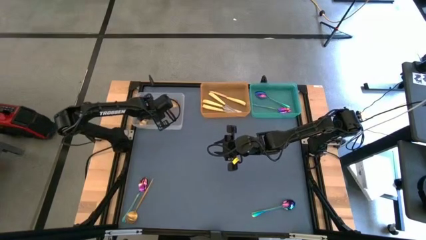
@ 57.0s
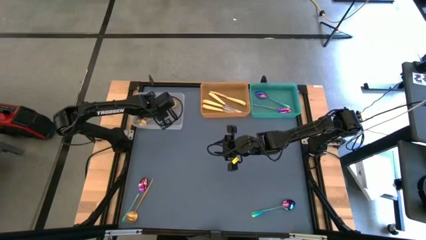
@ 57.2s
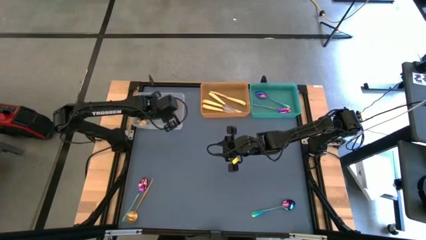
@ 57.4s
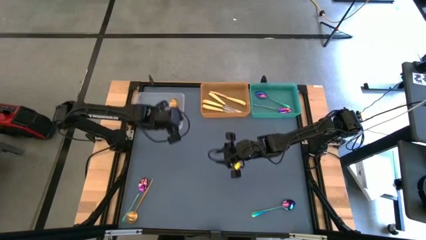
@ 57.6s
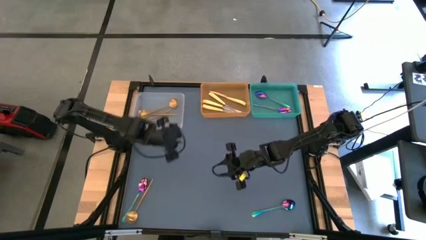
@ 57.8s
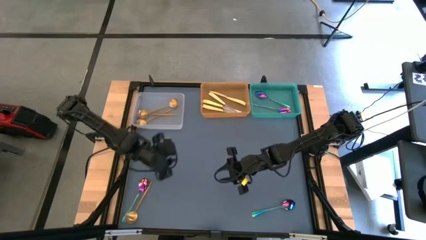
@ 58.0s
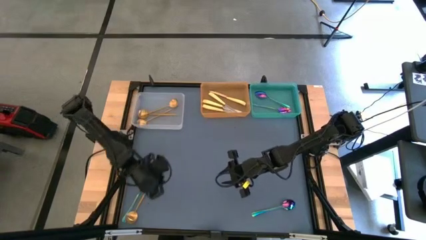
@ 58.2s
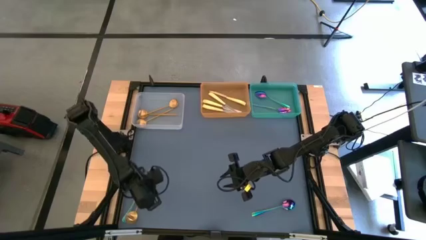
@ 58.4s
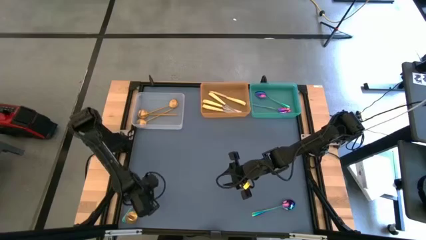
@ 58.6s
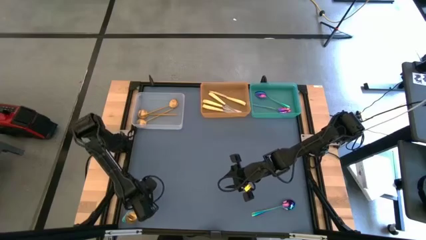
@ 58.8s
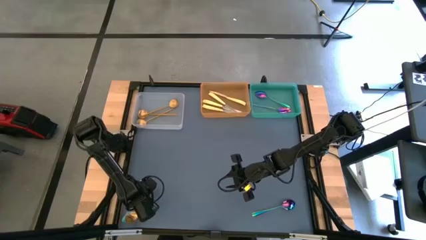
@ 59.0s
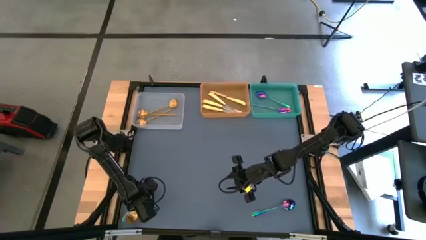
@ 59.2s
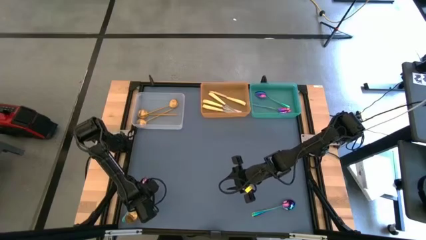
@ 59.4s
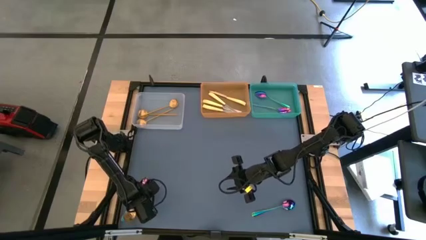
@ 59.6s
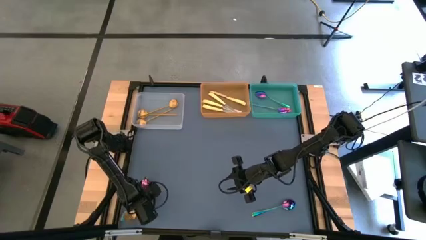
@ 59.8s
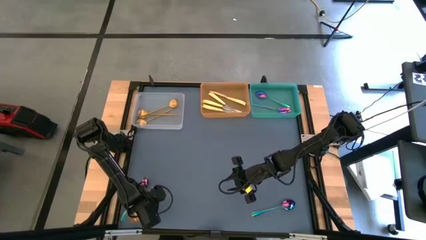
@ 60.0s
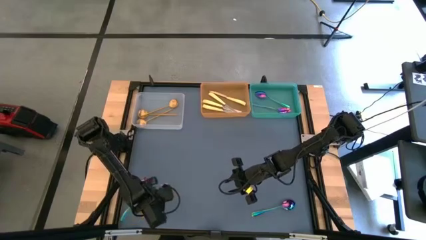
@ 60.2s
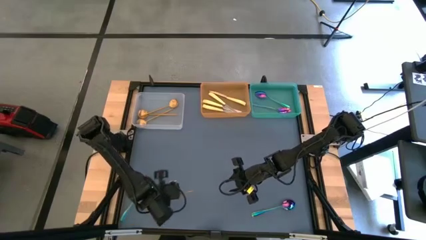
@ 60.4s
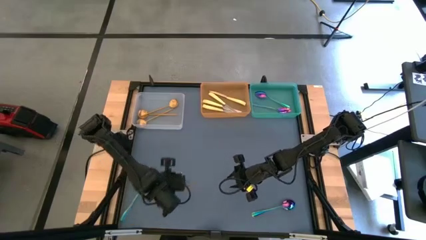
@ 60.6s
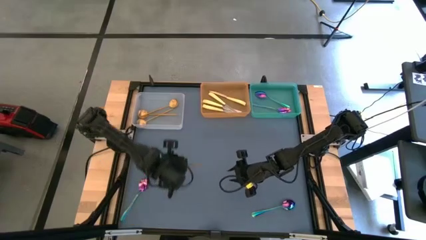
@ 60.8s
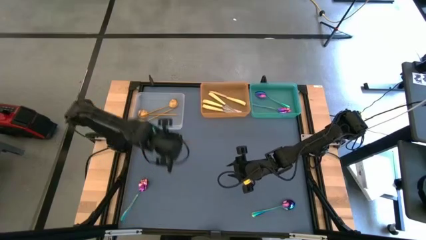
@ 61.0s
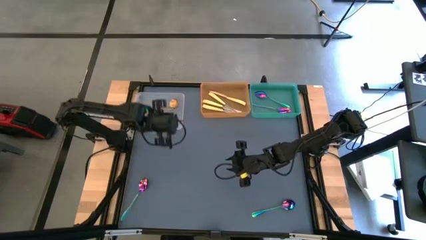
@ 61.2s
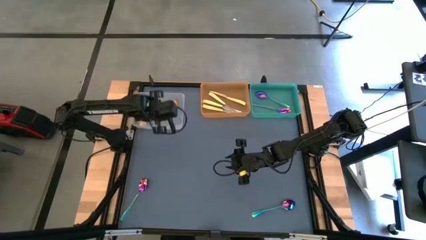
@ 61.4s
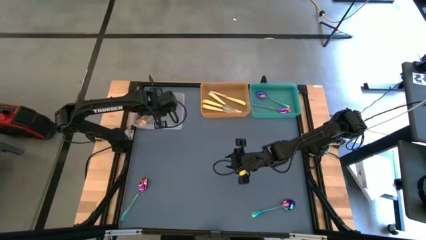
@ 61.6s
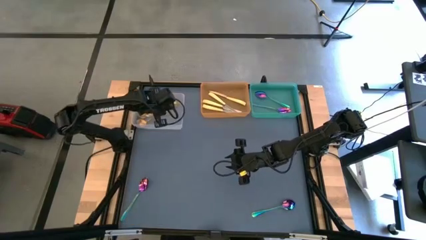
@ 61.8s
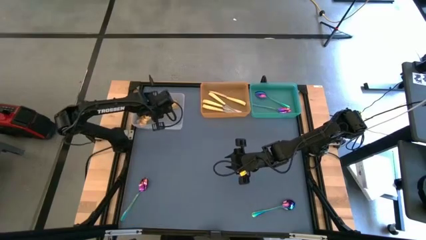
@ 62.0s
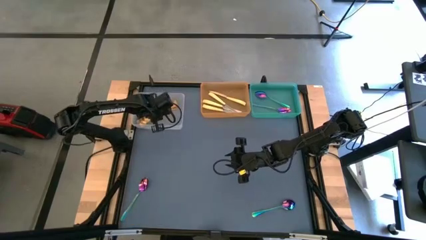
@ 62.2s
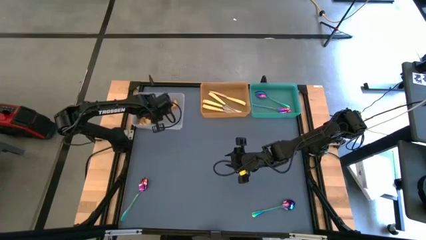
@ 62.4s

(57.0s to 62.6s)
Task: Sort silverware by color (type)
Put the gold spoon into the white bin

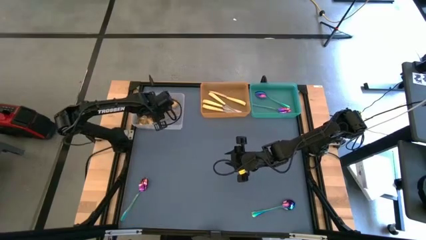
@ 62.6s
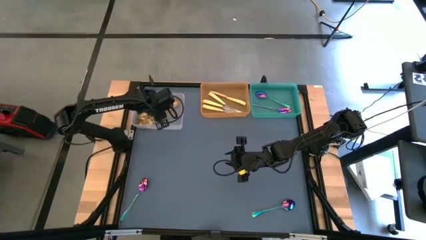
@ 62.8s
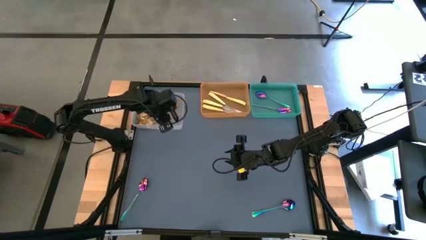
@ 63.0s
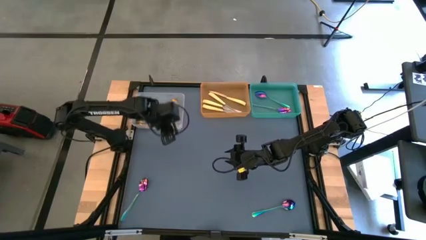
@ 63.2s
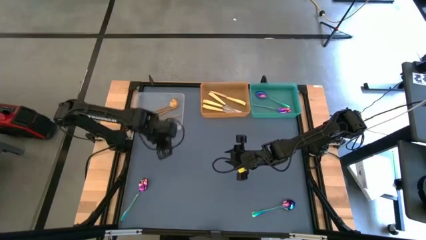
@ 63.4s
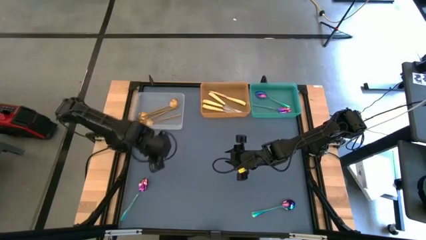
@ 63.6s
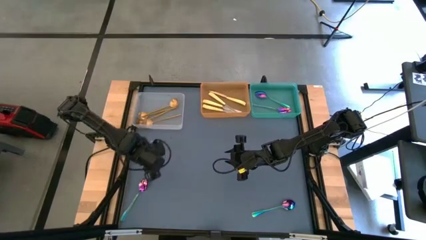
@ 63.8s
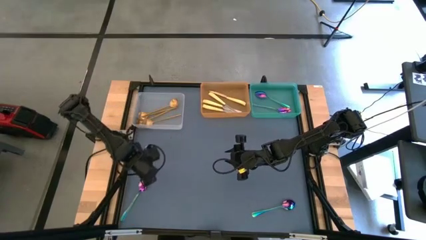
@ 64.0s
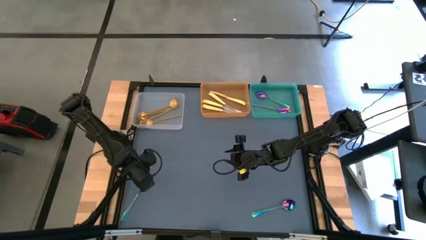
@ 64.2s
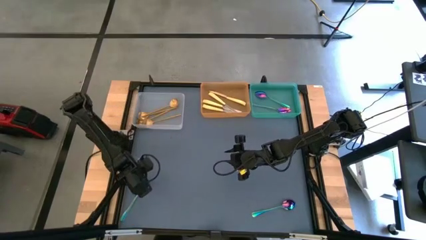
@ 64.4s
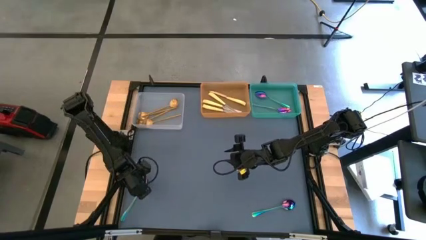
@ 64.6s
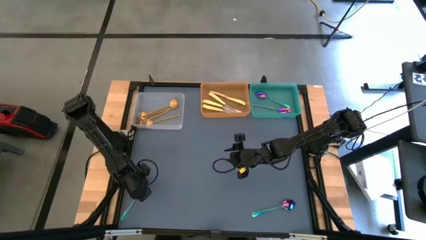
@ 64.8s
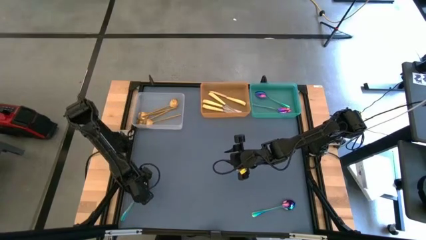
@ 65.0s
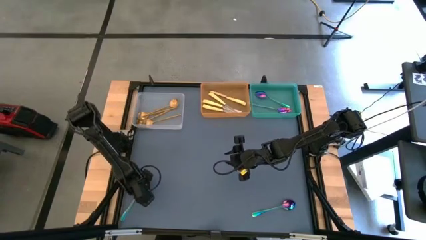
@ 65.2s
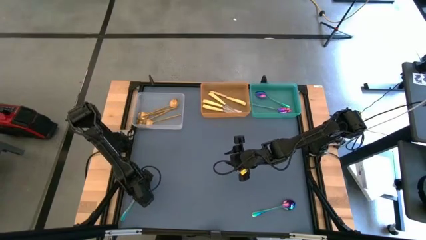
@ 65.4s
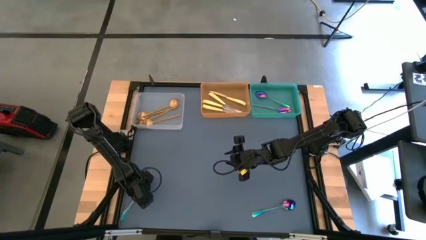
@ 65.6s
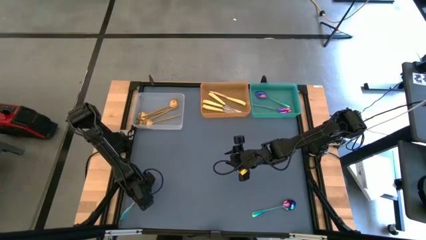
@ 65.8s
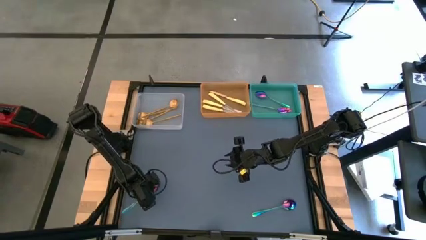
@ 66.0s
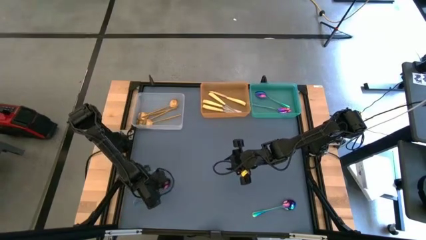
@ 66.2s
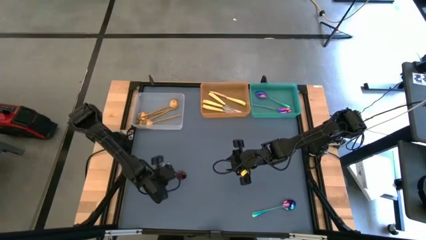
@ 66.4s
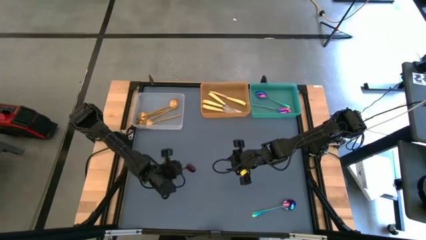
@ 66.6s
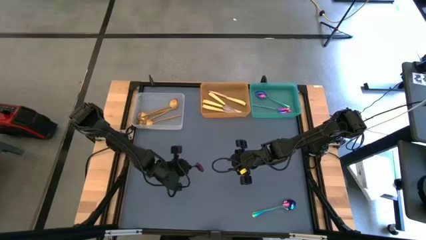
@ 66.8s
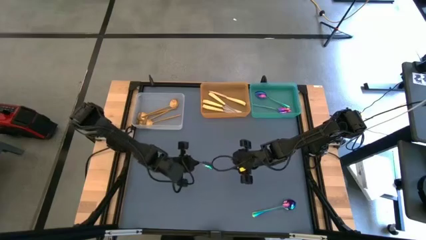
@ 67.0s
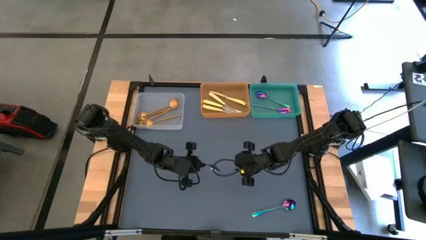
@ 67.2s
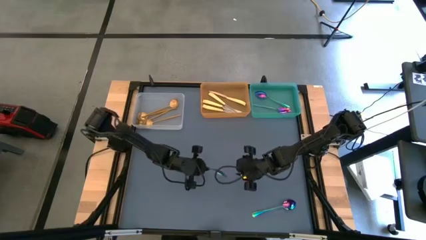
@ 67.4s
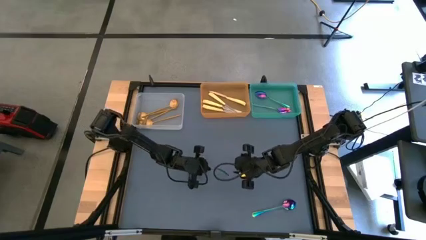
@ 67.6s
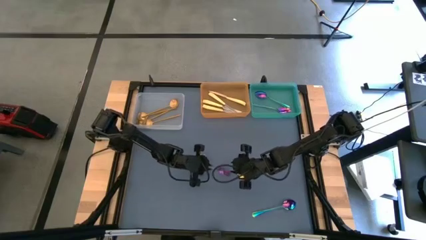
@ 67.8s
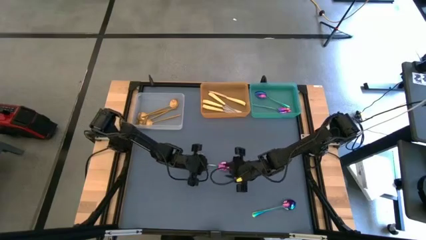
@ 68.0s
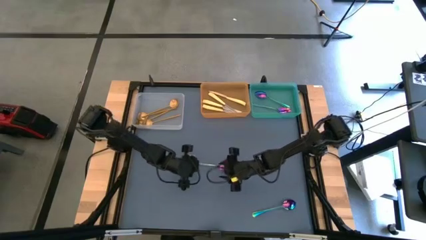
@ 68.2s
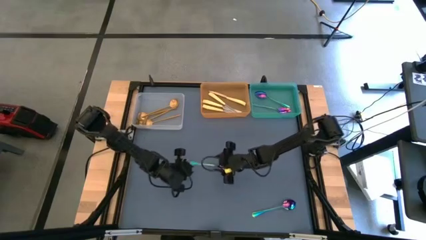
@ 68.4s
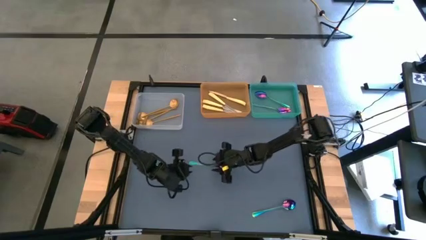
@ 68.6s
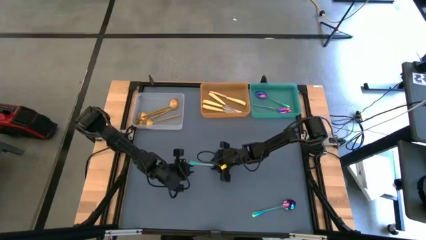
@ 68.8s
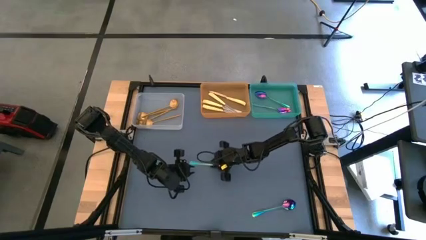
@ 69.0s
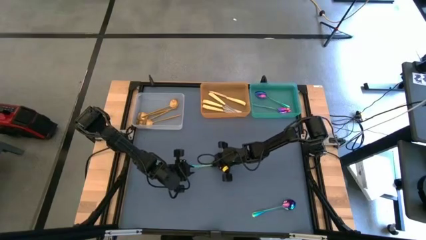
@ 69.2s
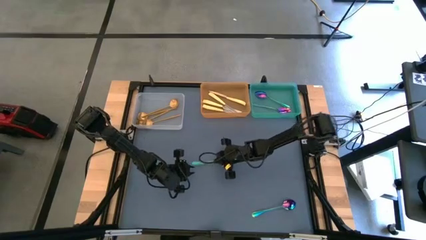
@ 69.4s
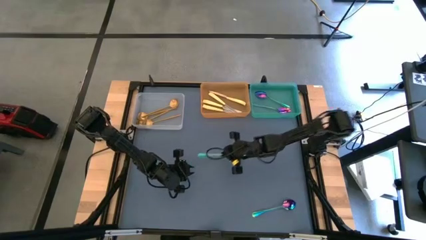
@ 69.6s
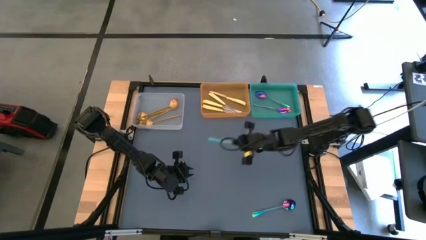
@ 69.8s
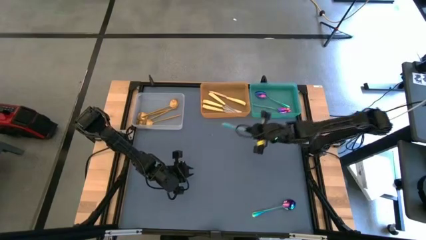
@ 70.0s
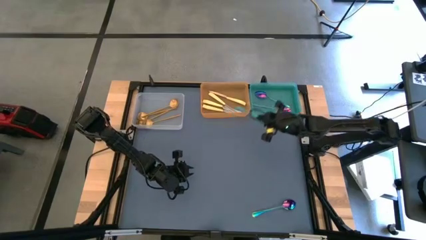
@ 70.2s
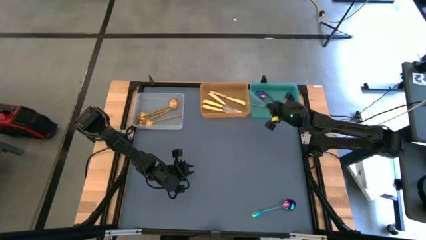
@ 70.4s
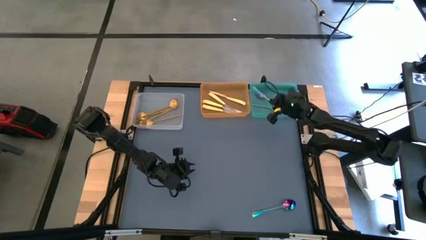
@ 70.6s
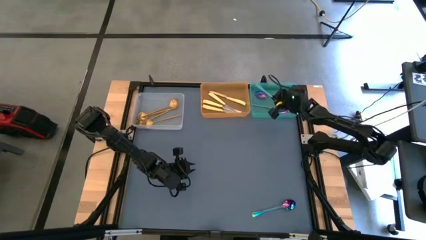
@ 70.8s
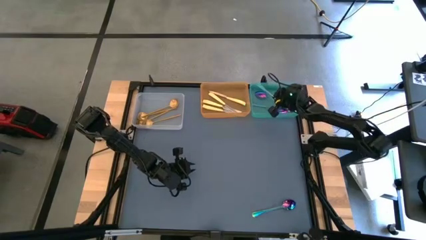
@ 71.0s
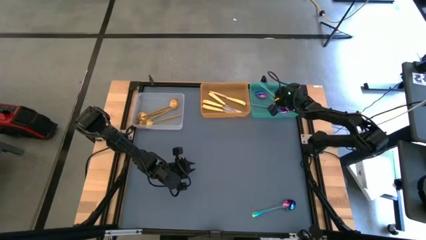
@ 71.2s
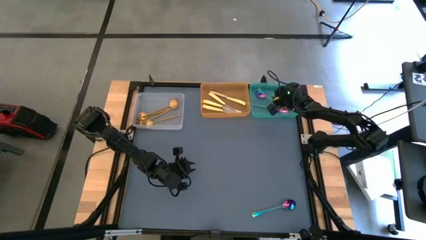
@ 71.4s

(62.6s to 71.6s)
Put the blue spoon into the blue bin

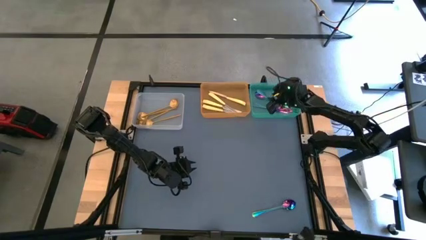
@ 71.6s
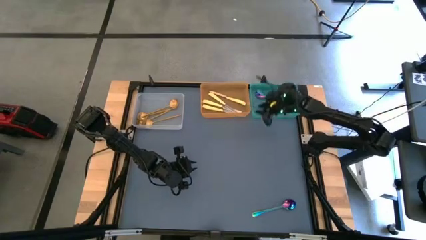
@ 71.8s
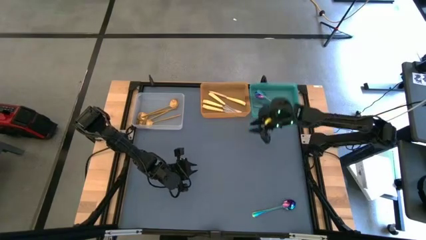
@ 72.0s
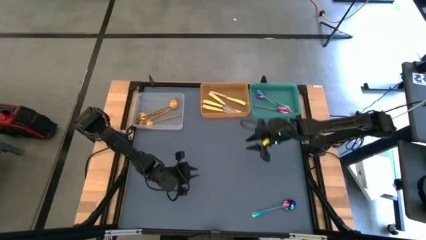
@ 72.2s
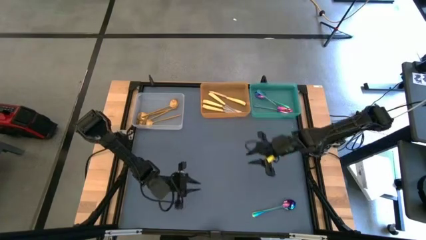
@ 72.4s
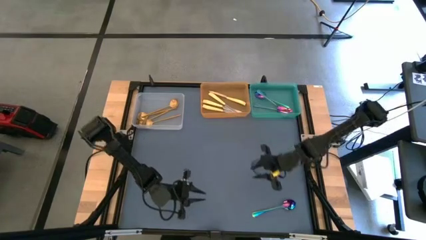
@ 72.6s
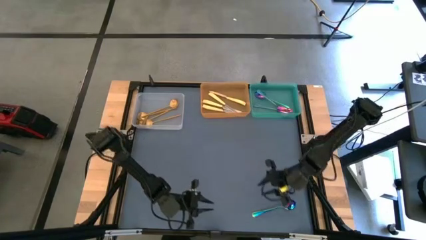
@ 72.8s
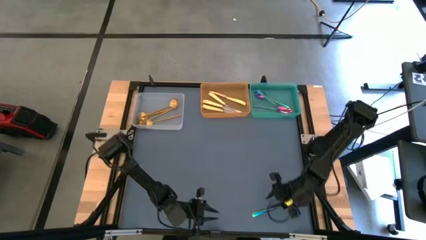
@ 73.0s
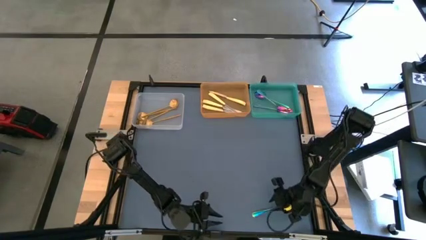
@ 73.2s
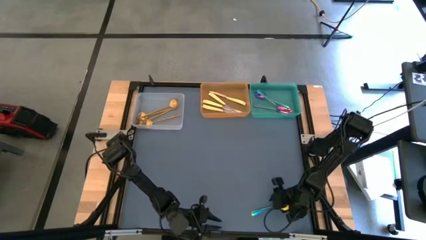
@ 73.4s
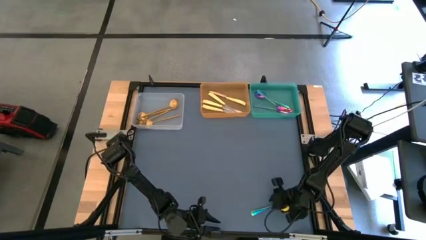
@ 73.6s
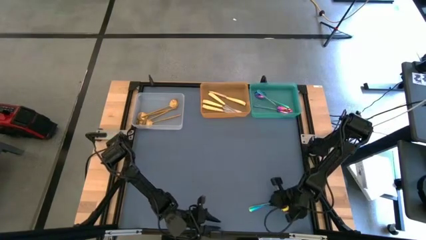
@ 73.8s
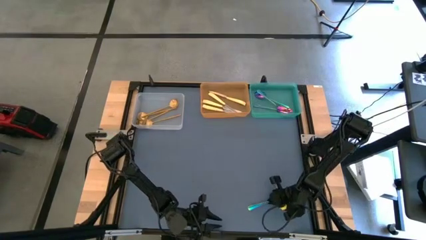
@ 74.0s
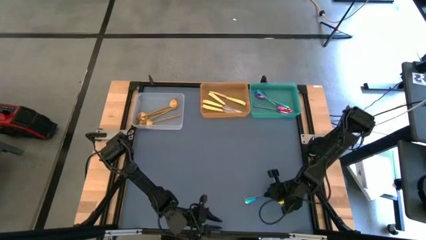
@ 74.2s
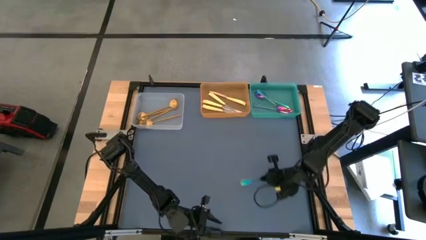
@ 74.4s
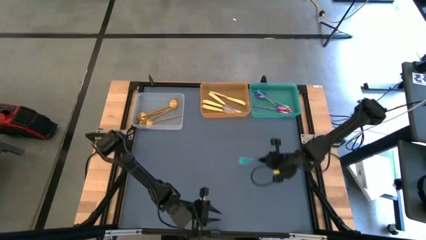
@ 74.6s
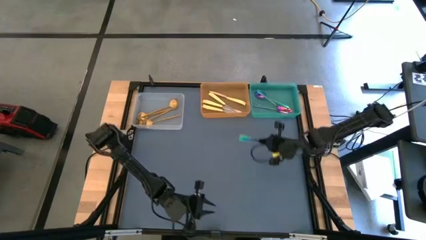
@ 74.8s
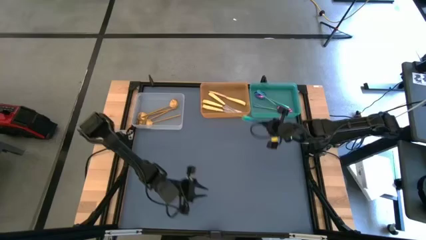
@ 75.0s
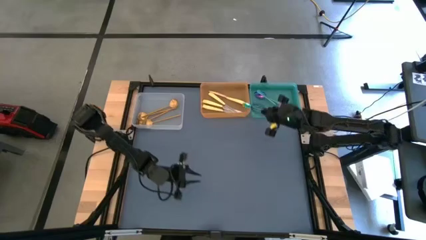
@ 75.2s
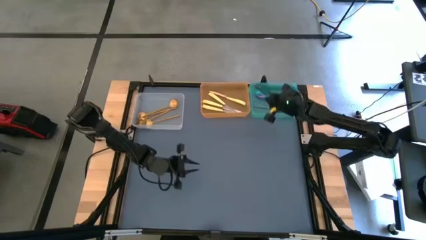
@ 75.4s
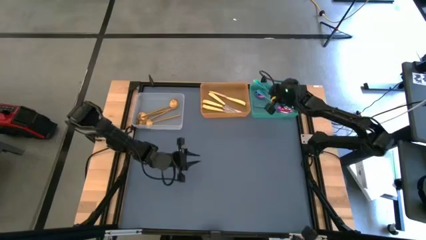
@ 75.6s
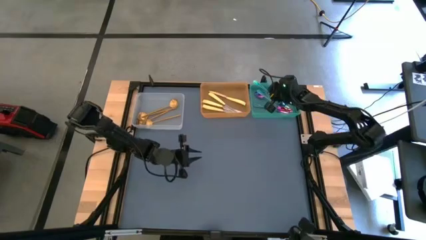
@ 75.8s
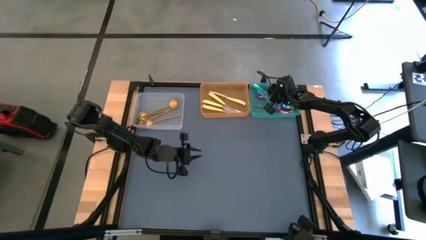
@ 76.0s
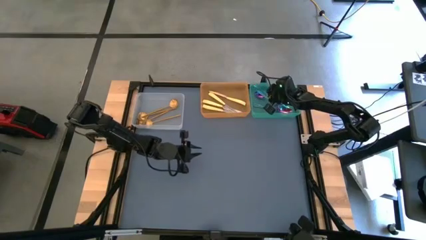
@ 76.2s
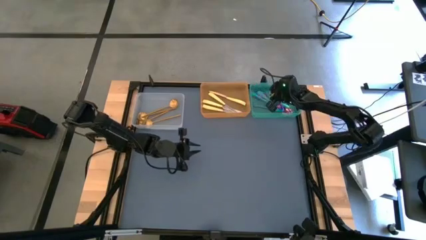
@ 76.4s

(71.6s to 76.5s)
Put the blue spoon into the blue bin
